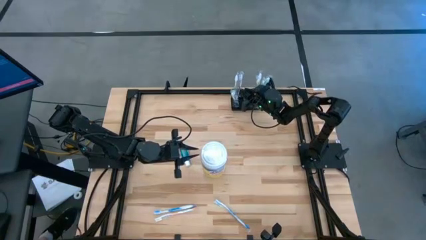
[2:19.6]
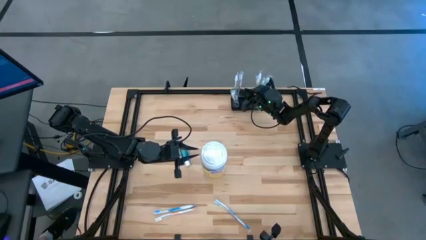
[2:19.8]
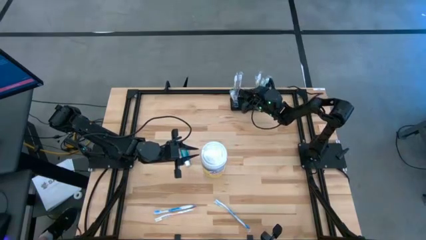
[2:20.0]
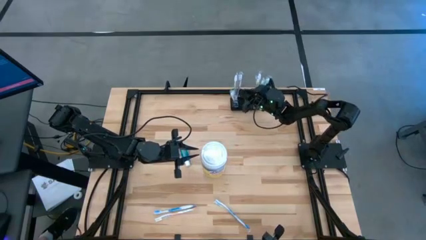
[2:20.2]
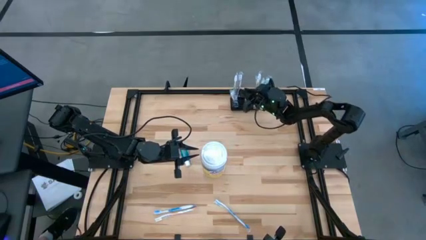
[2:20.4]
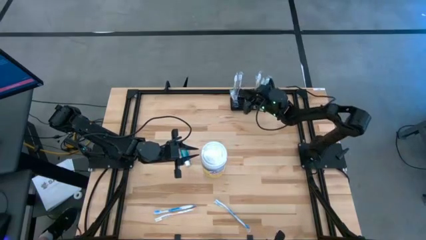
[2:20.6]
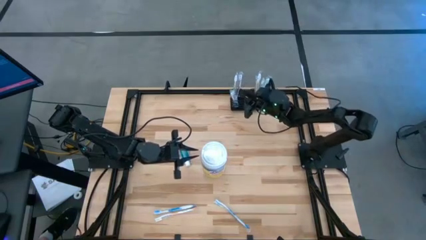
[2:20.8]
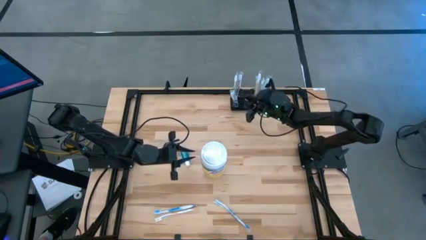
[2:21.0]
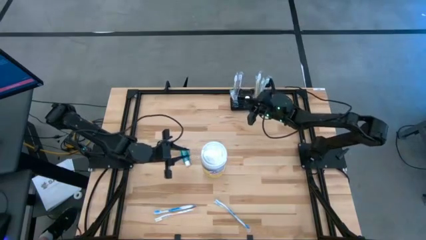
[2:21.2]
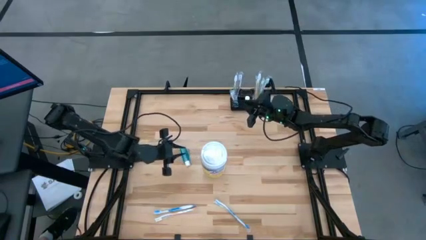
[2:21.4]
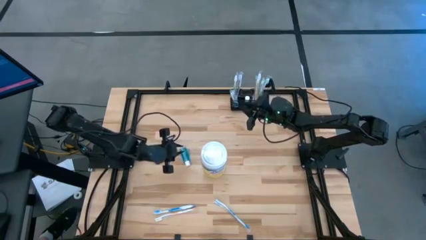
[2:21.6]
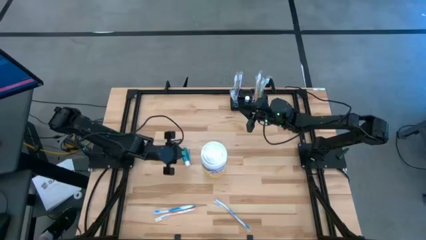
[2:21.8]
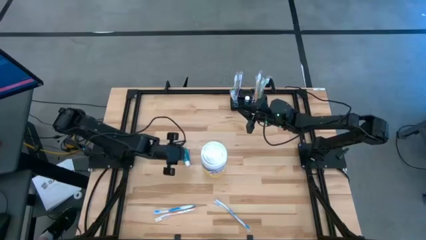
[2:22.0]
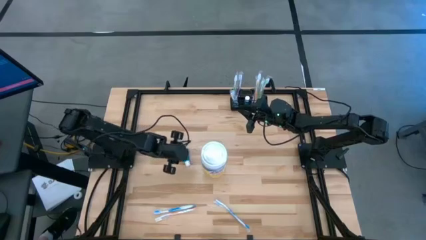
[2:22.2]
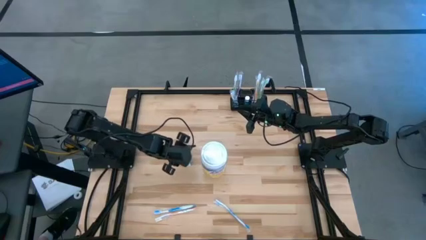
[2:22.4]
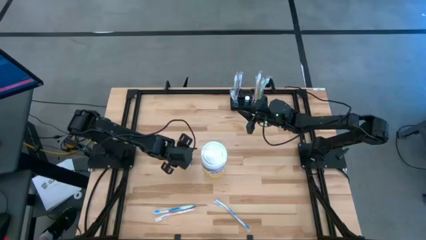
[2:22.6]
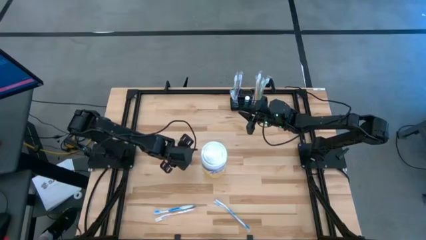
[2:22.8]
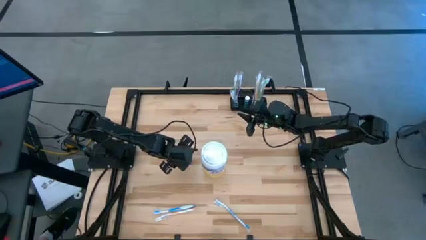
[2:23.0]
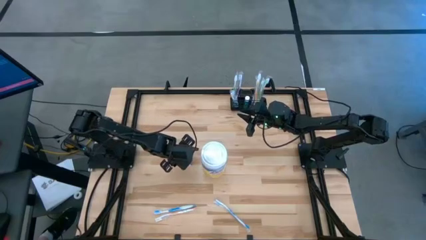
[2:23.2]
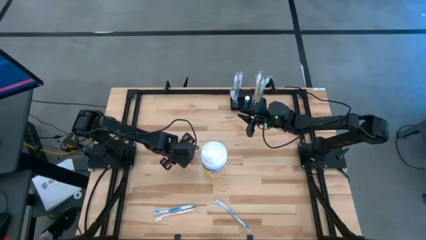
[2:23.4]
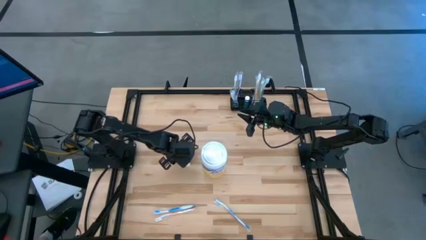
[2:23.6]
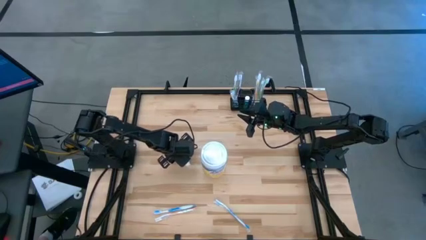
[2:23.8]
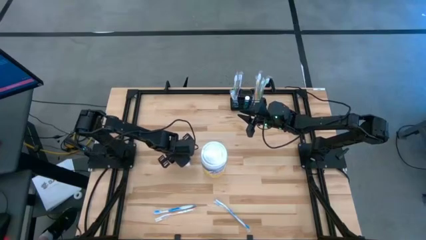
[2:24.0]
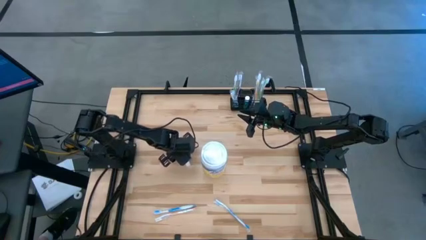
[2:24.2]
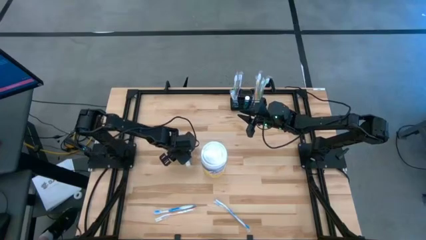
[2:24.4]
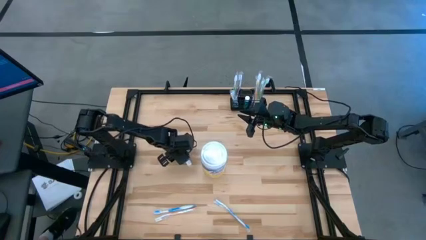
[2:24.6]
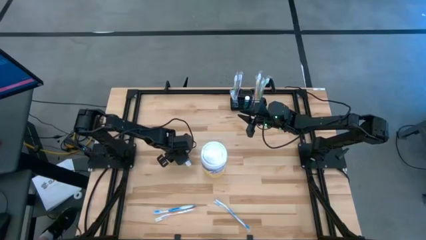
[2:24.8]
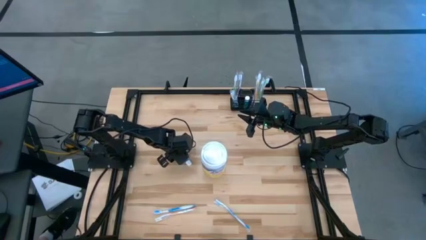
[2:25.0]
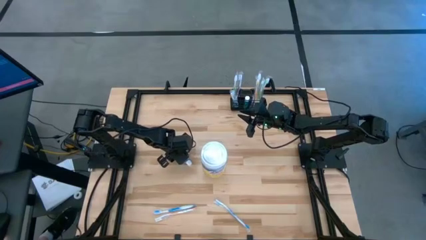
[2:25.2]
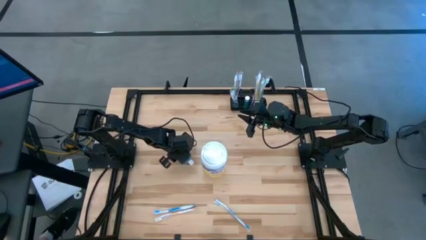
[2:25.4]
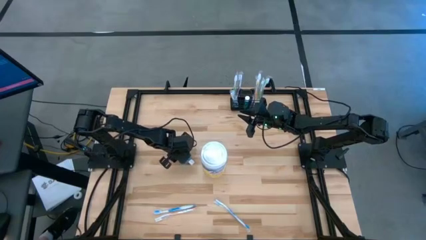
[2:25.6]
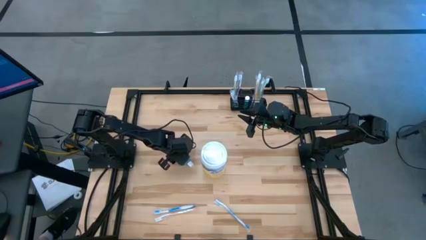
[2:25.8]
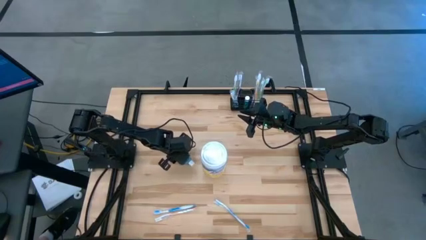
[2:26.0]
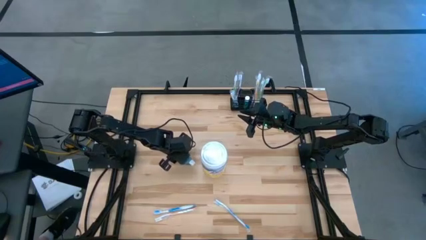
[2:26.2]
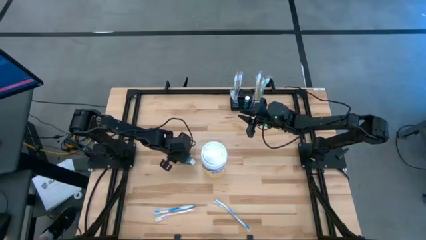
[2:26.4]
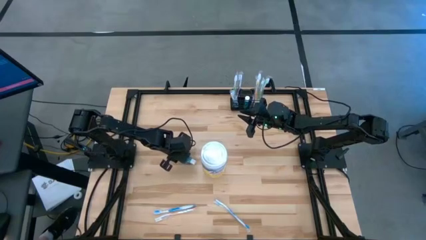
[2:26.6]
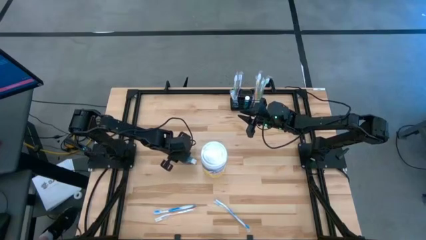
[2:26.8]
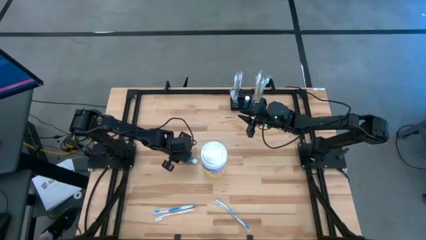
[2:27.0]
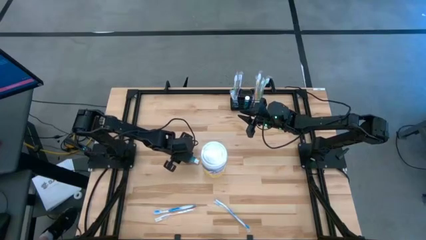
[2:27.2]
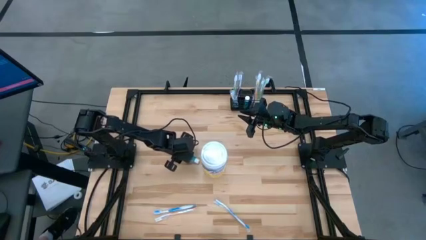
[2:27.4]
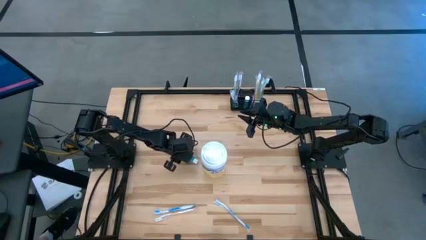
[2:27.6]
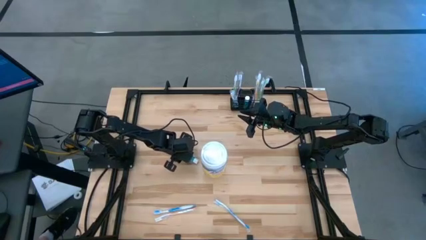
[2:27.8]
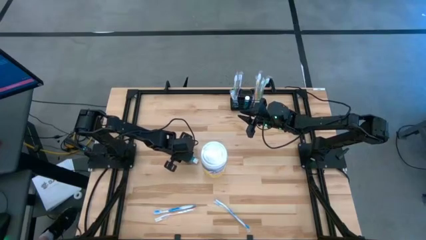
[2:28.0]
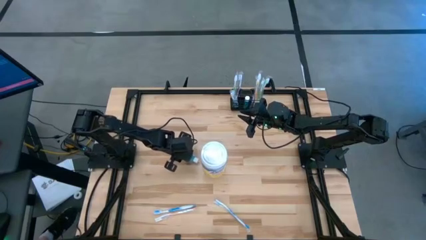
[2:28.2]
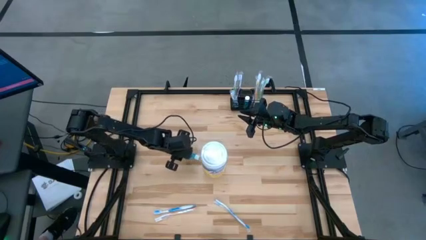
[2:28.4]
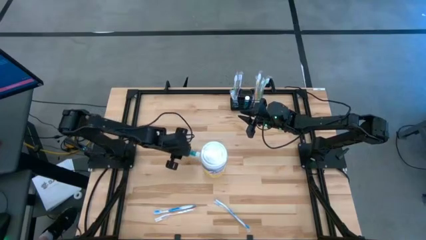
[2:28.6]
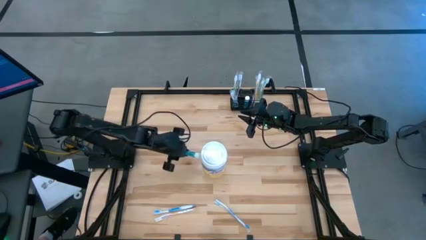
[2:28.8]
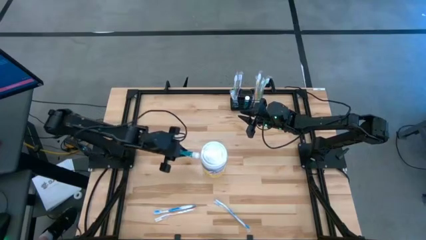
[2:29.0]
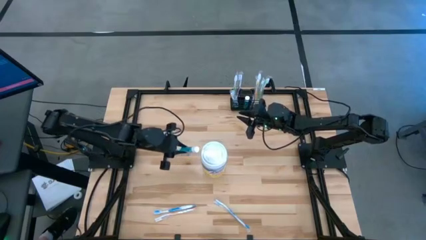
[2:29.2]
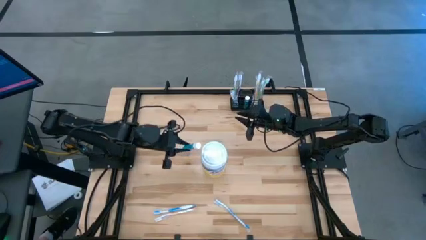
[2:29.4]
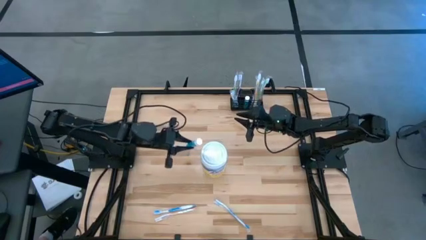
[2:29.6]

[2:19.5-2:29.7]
Task: Pick & Place toothbrushing station
Put the blue mouthwash into the black mesh organizer
